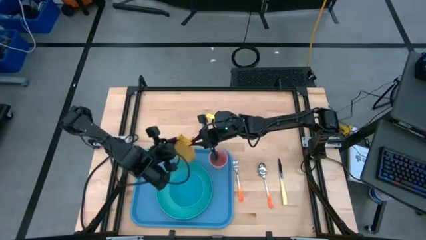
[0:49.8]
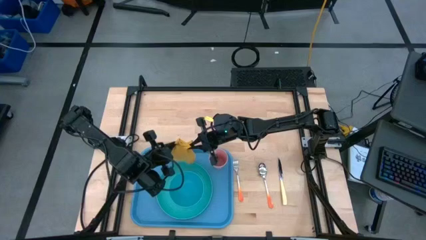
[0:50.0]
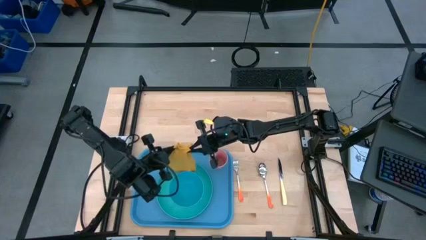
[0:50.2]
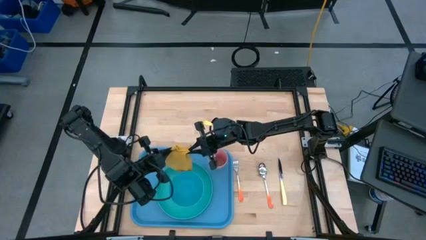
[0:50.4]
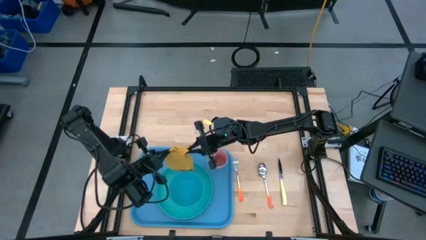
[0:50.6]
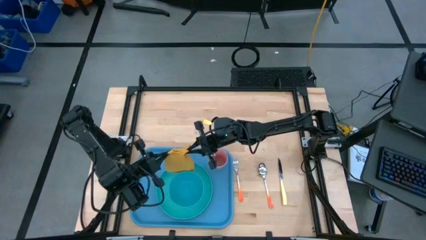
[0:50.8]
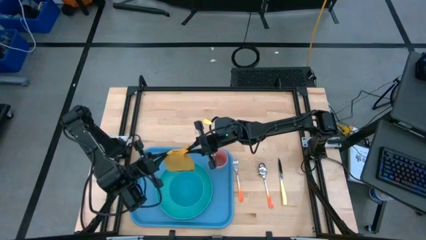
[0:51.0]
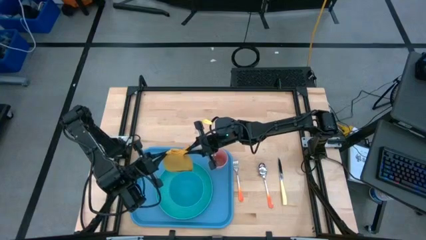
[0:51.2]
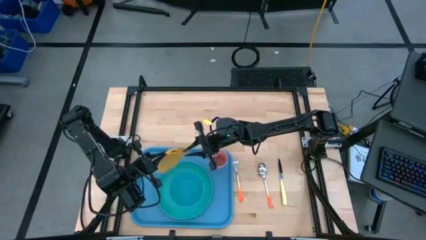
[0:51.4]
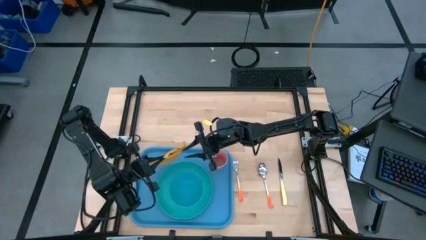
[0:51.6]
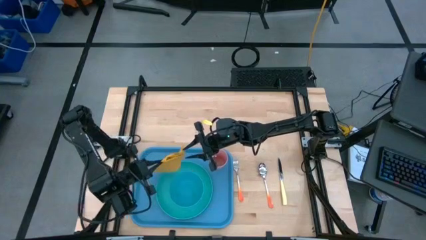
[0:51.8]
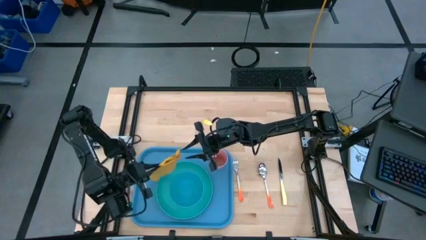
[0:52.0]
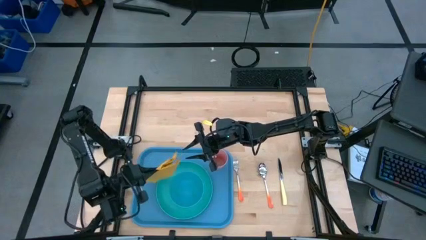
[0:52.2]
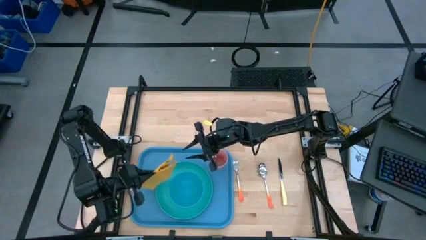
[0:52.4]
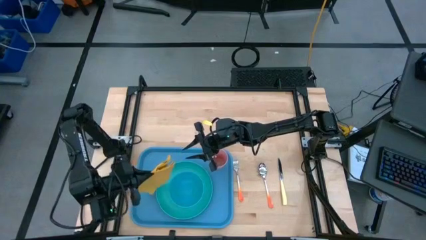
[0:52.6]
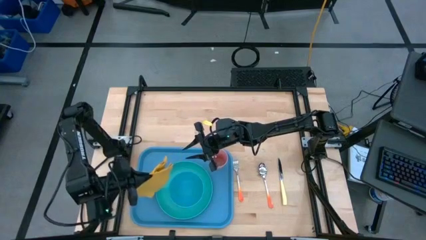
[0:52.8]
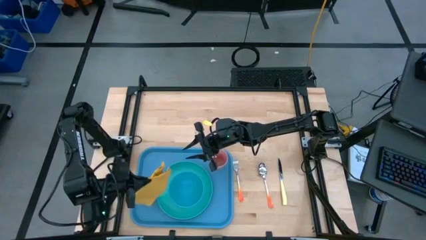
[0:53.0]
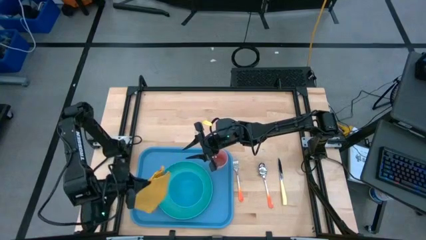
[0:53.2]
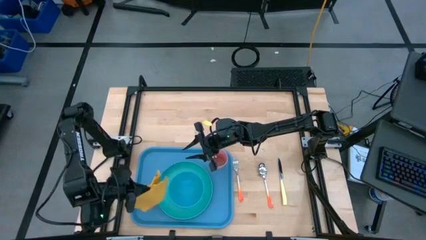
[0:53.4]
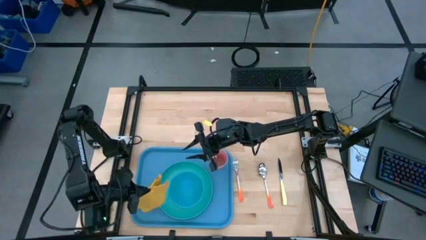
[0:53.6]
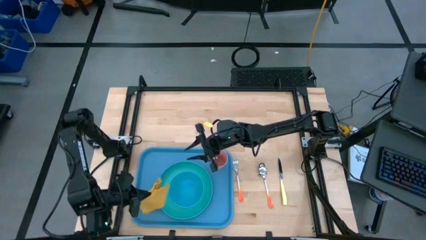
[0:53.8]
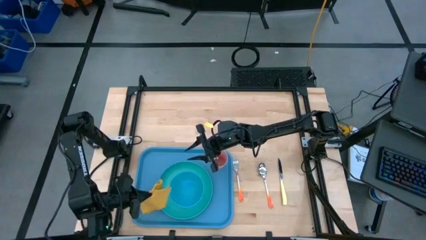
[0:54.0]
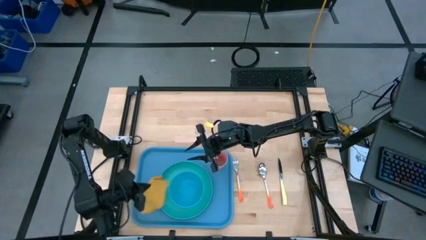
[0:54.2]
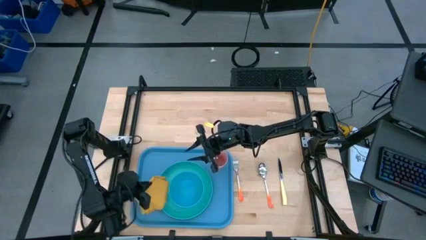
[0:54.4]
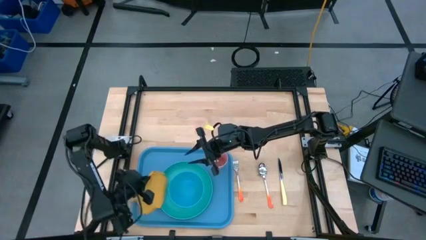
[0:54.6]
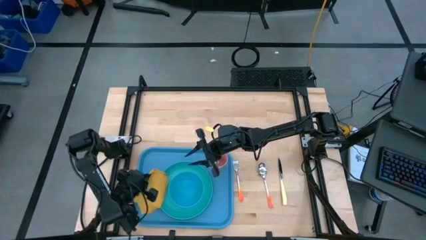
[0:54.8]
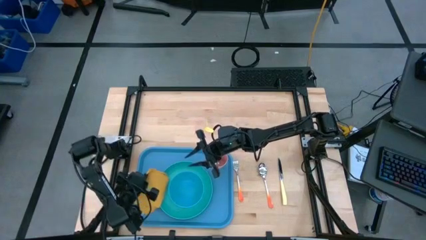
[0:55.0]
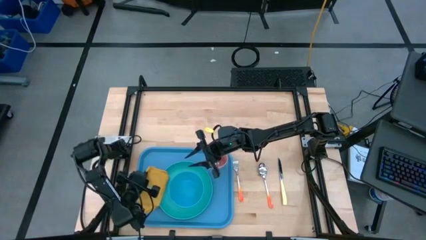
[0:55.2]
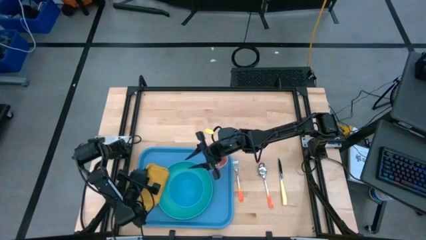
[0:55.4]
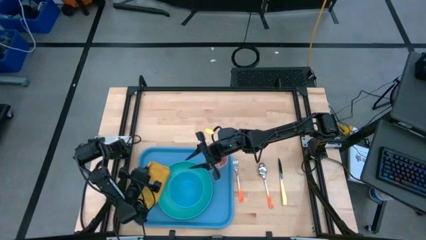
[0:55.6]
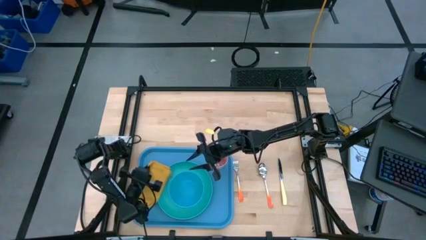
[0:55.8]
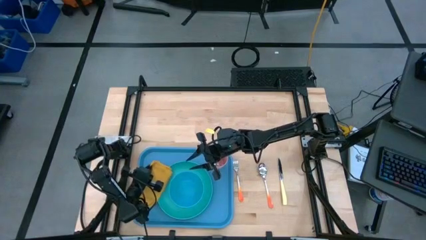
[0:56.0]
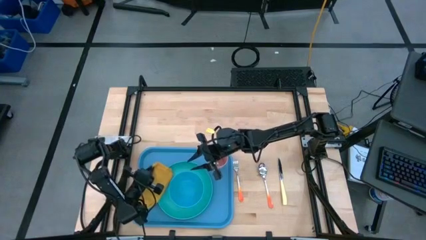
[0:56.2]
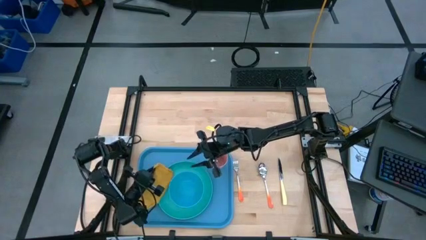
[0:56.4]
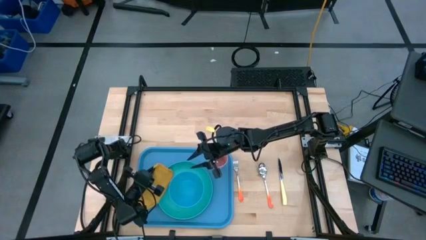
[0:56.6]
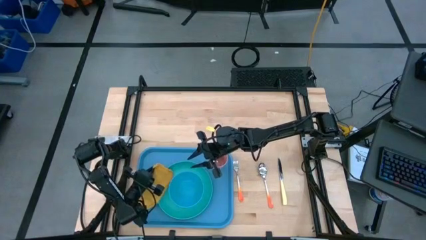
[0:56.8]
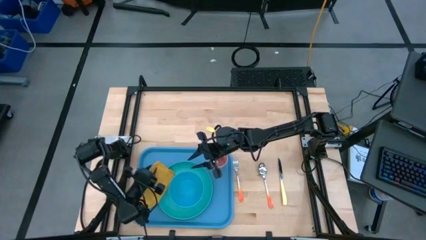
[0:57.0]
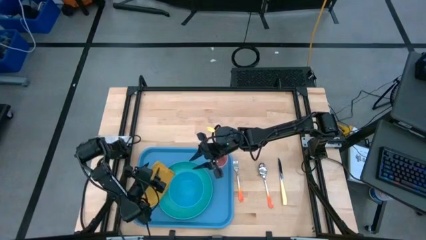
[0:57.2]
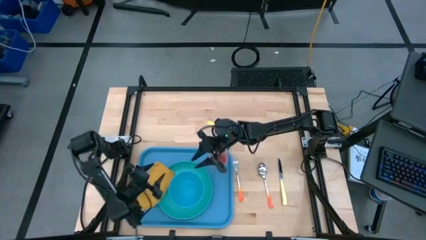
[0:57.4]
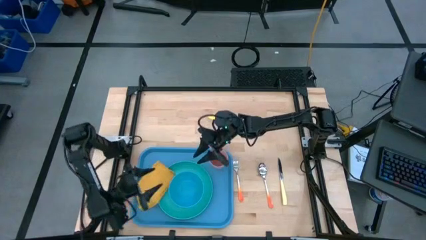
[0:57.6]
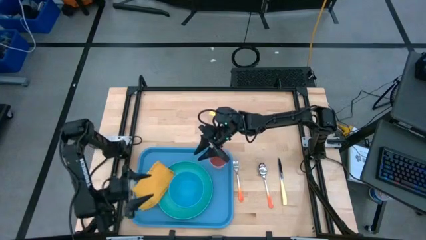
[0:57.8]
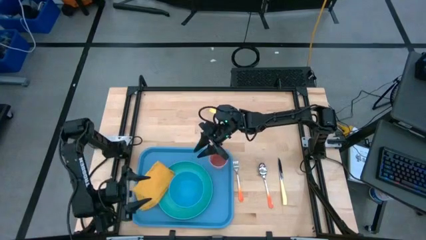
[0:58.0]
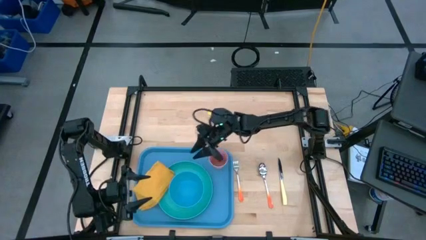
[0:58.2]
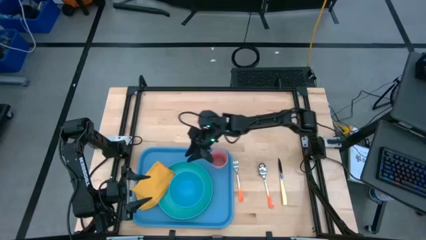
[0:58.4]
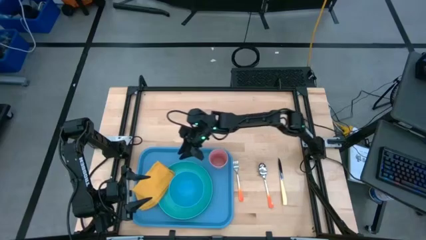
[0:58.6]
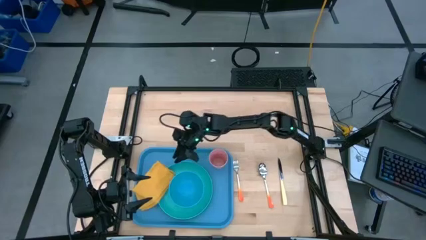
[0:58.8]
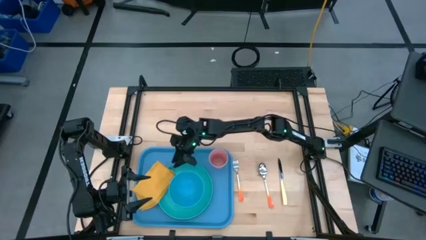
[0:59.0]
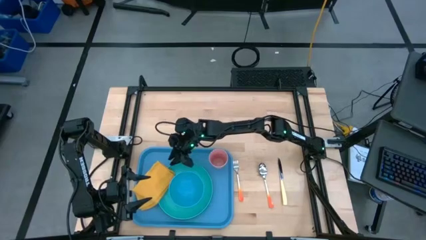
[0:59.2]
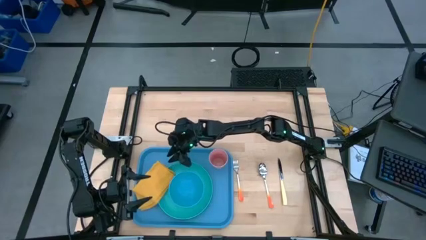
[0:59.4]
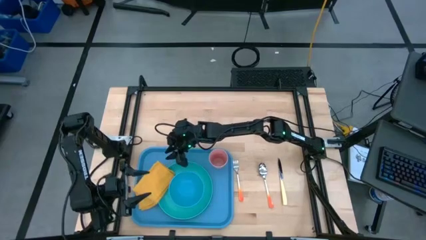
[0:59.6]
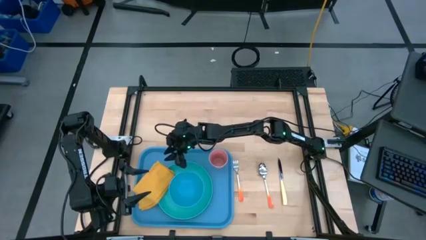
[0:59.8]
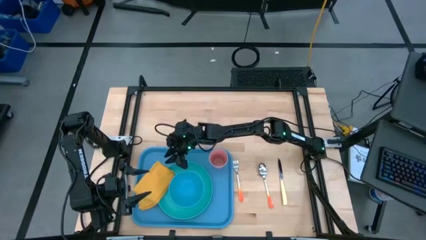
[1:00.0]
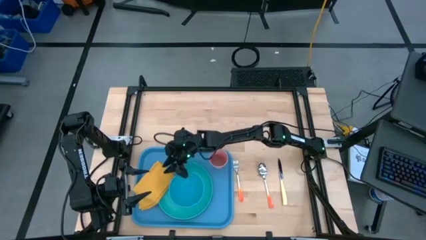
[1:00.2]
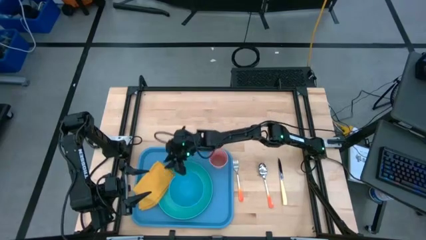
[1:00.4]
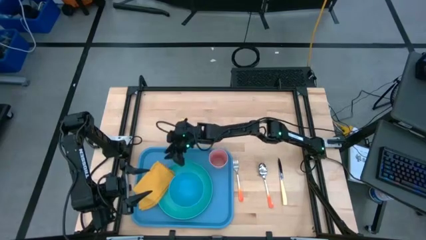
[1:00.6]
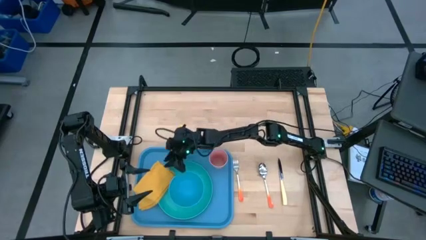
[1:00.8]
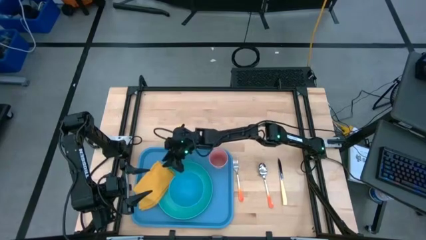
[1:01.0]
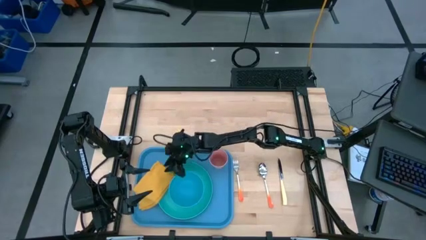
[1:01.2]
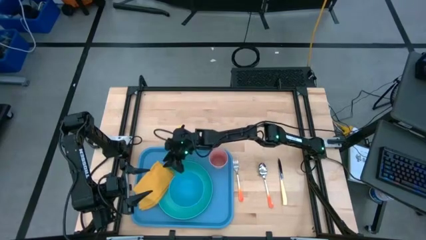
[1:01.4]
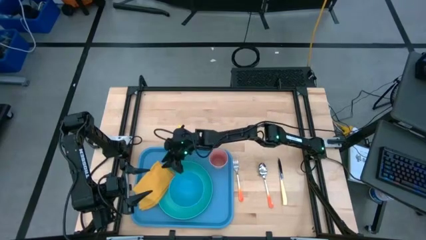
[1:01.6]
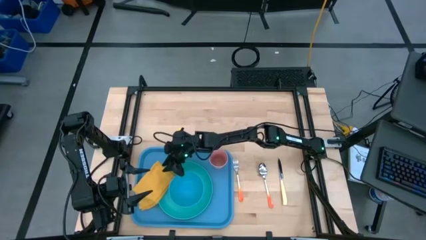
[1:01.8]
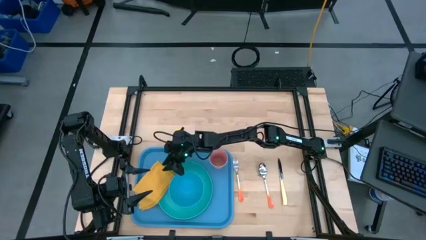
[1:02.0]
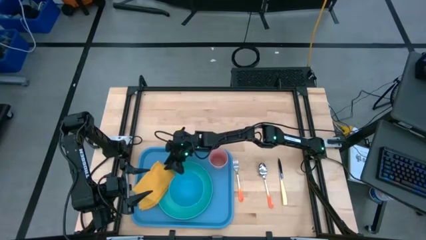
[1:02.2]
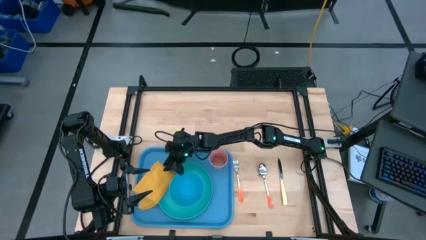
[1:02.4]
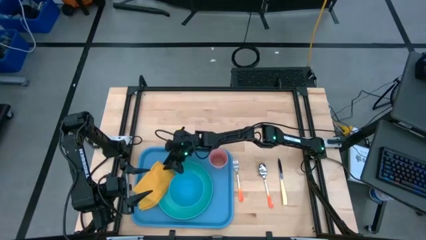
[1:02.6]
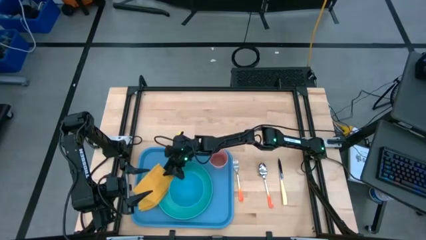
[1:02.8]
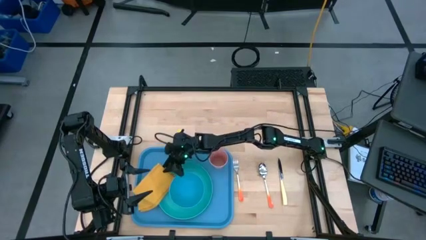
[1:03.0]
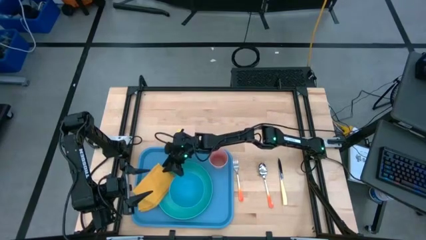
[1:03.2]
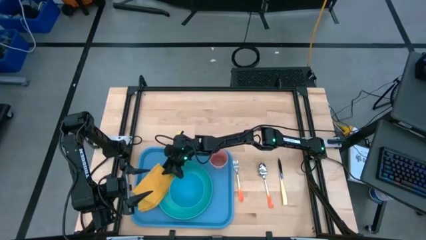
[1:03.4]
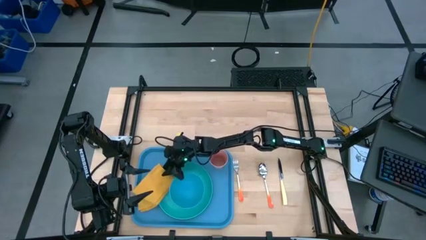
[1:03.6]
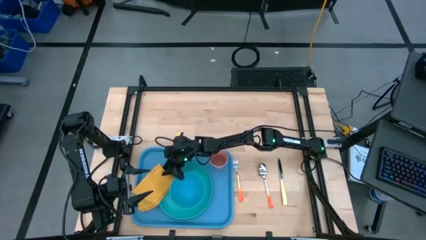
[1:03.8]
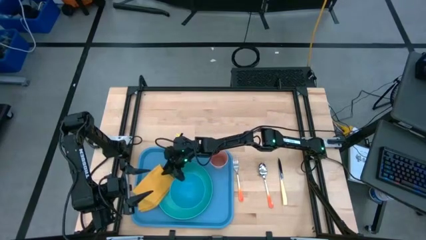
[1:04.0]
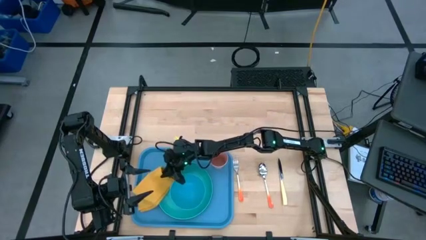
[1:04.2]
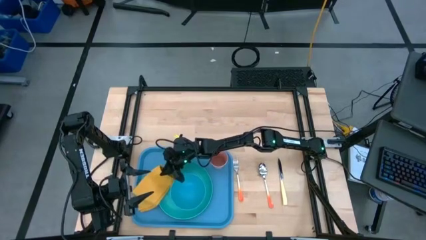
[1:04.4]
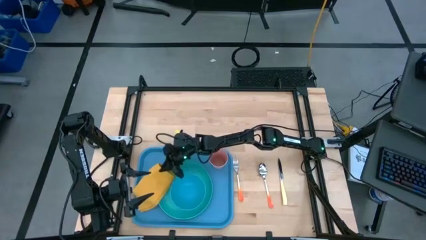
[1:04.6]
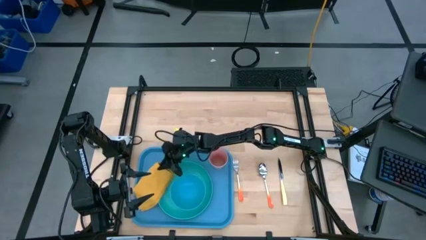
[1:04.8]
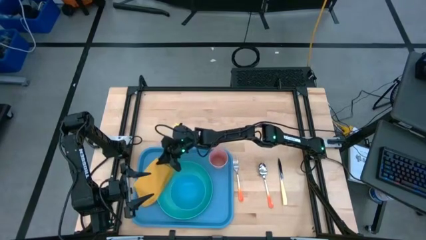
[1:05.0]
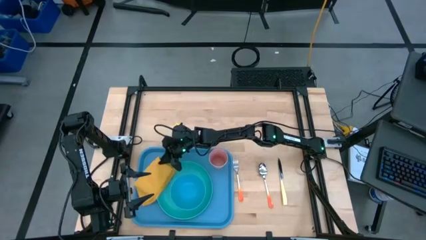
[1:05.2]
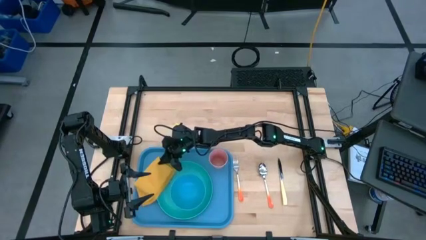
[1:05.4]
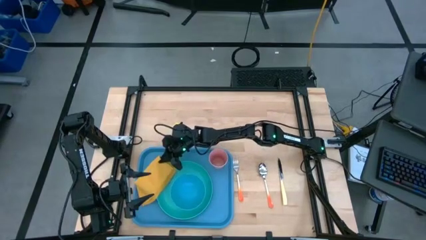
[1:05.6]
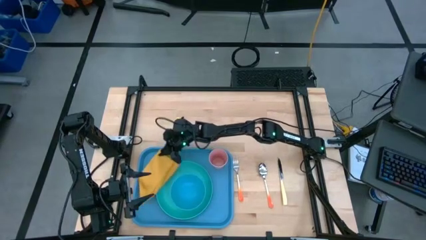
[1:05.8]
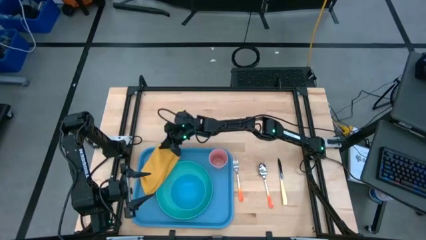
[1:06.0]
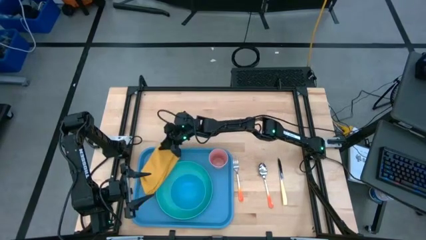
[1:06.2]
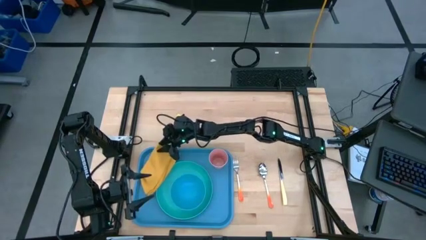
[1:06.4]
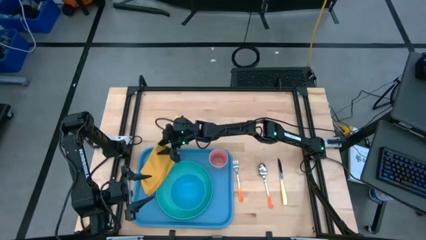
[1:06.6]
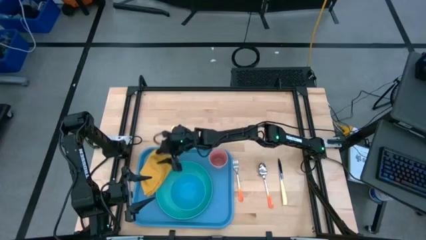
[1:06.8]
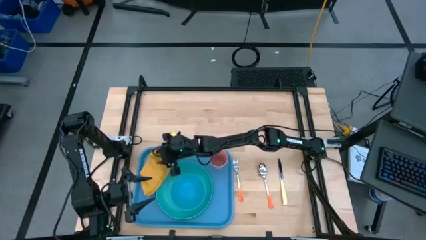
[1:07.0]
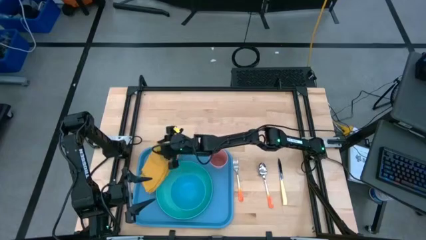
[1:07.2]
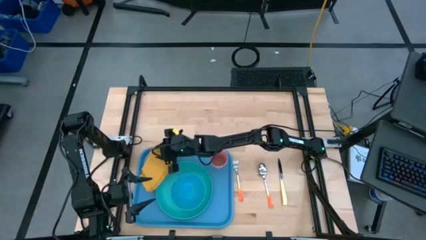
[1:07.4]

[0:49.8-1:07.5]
Task: Set up tray
Put the yellow table napkin on top of the blue tray to the left of the green plate
